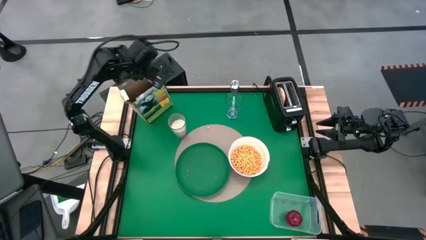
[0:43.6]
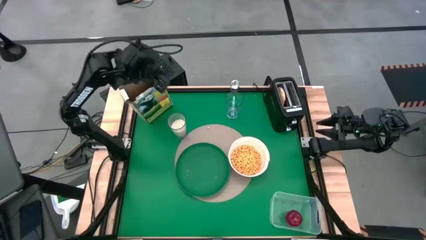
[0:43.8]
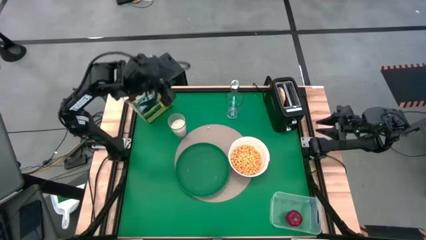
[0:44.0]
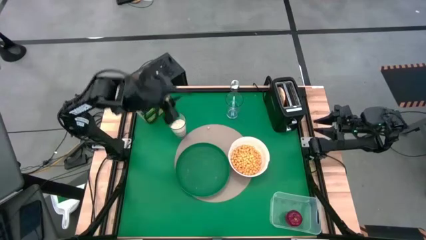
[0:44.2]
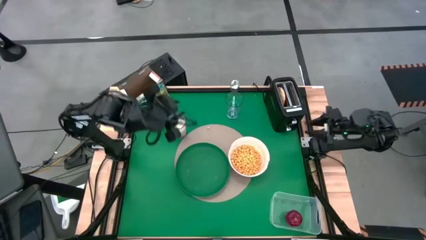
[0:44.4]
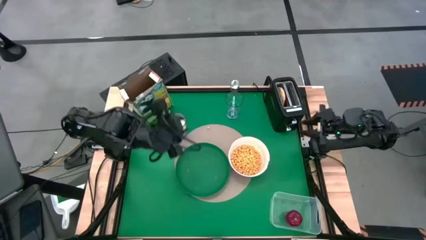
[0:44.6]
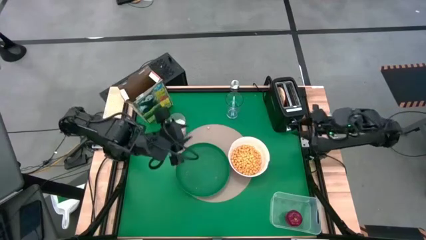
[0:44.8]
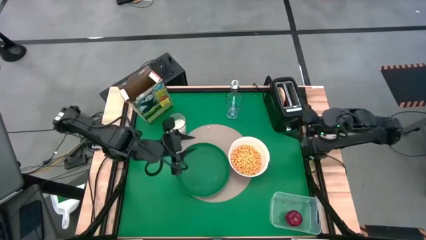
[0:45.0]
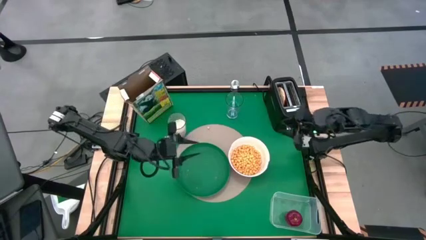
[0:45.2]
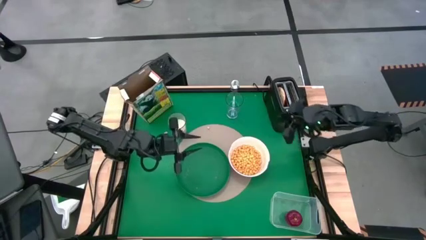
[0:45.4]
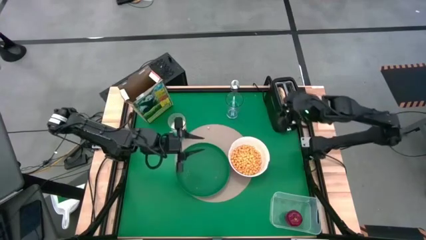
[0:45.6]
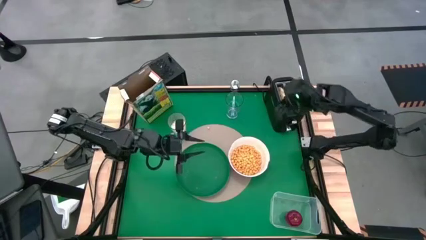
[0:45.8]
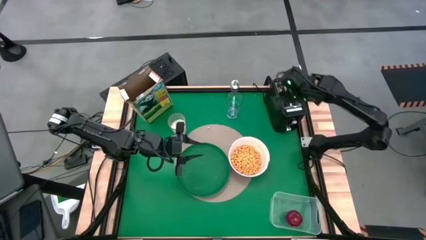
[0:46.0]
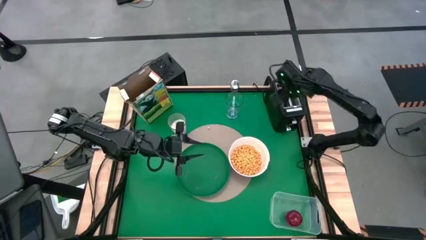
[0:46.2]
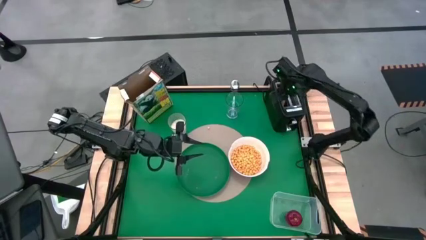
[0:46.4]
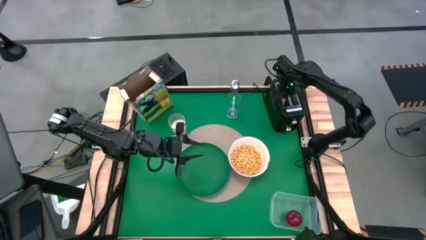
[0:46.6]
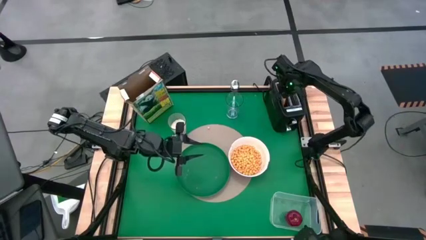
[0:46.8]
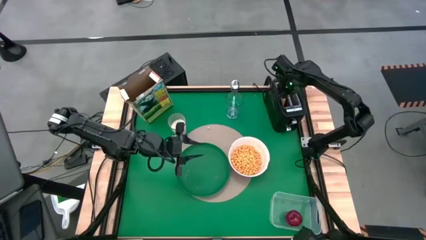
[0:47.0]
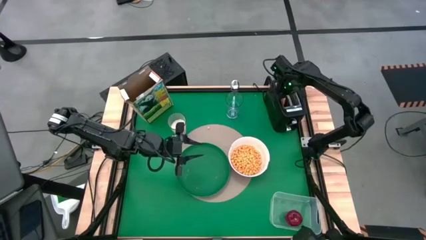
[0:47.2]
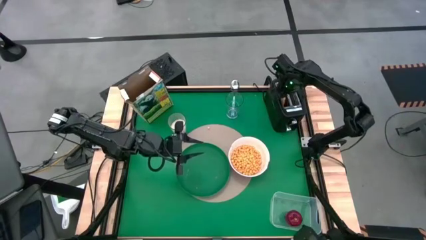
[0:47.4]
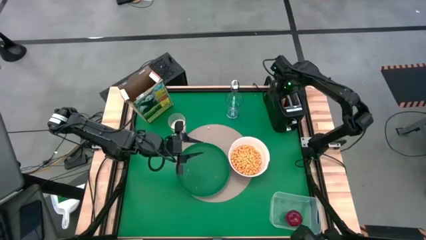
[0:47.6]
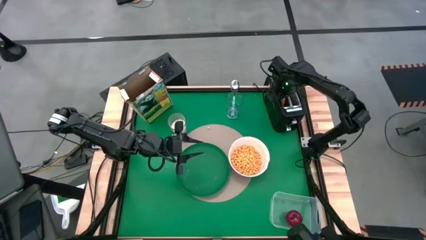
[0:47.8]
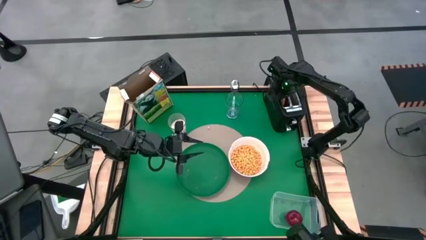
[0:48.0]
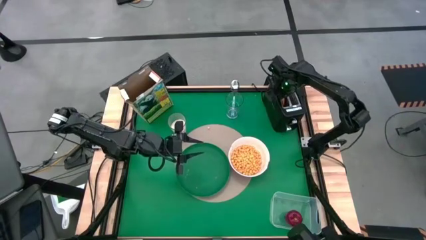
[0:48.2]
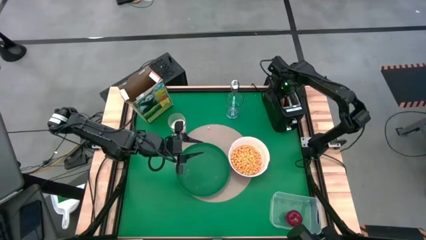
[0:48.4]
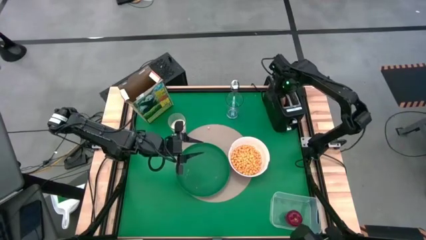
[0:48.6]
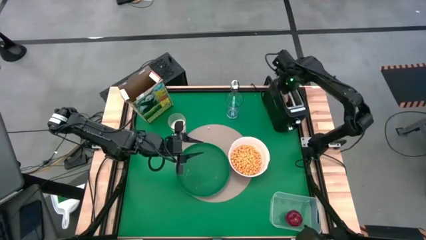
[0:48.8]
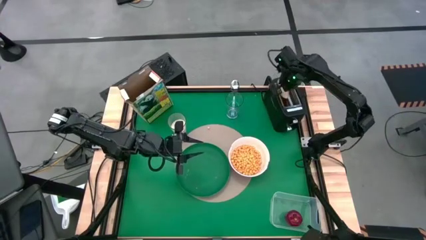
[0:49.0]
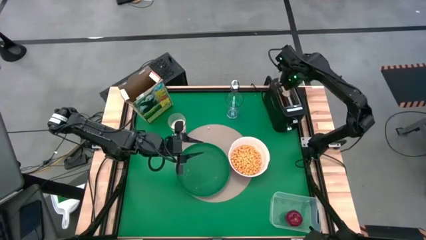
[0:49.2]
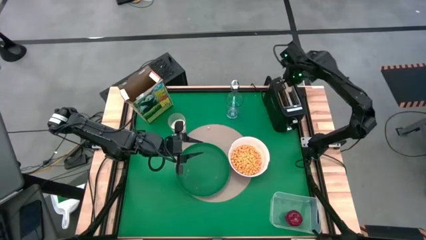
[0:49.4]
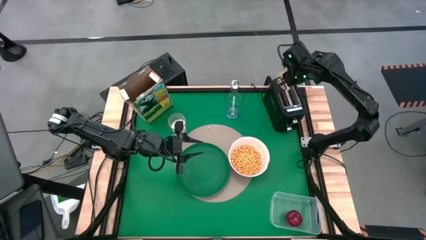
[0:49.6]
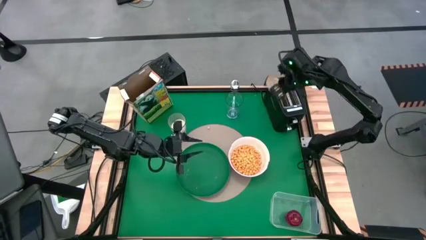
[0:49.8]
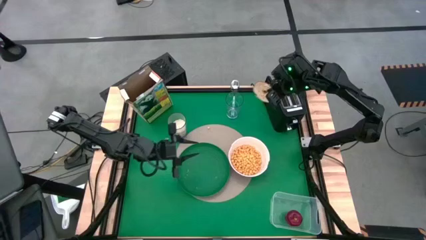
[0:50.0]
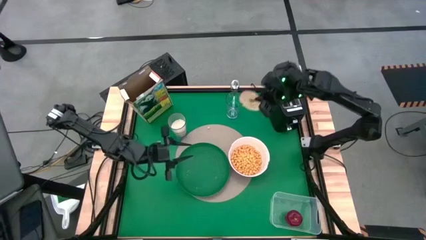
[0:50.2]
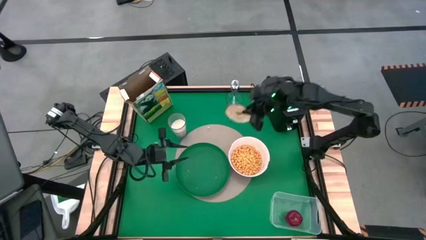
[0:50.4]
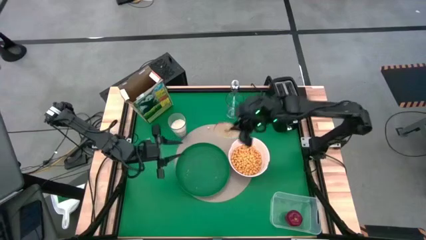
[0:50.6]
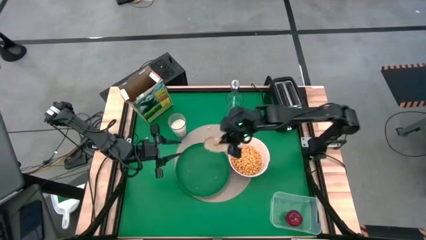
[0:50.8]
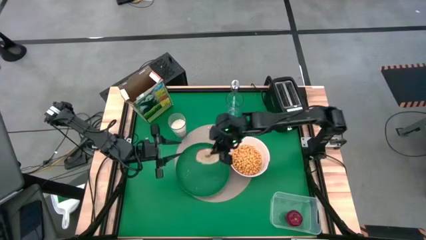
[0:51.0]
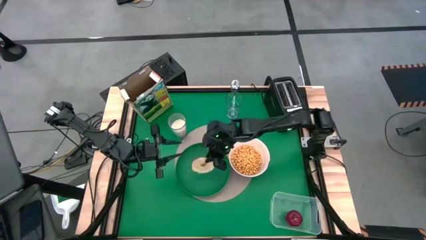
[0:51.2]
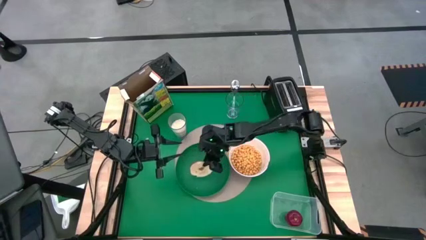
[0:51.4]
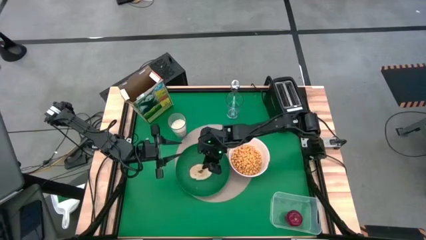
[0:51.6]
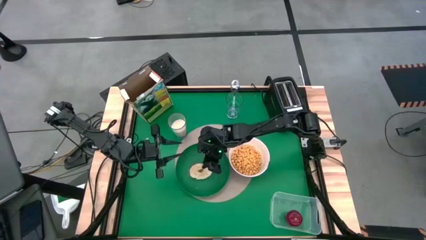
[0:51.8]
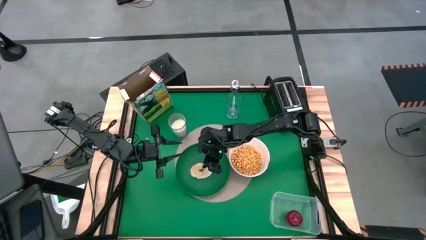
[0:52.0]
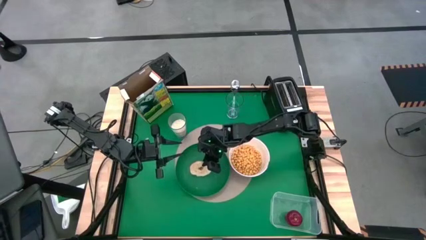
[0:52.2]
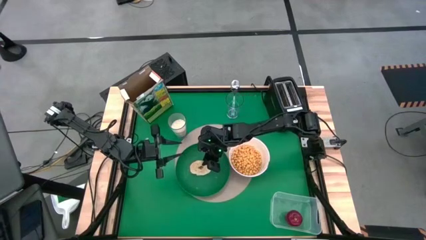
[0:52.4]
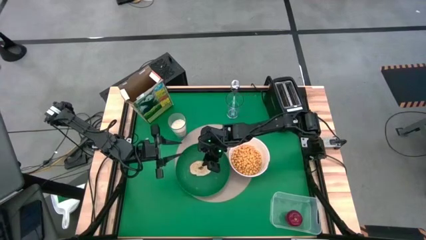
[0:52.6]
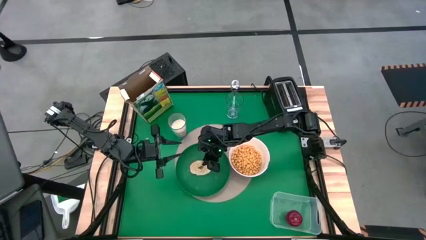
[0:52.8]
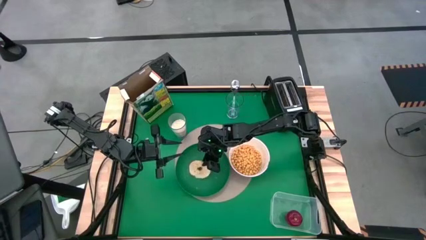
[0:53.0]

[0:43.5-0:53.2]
Task: Arrange a breakfast setting
Put the toasted bagel the green plate

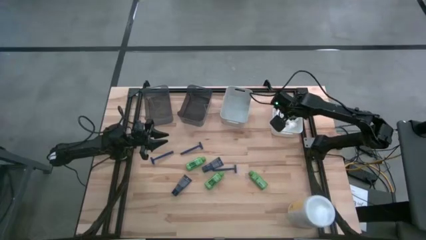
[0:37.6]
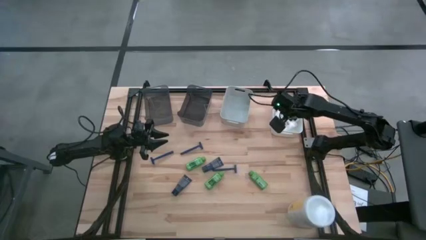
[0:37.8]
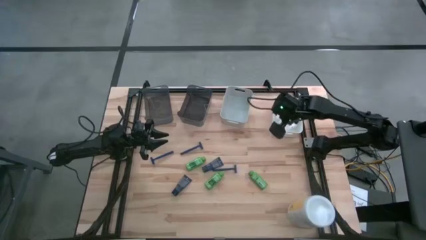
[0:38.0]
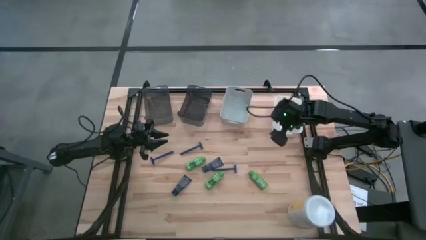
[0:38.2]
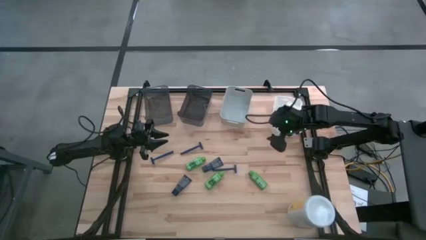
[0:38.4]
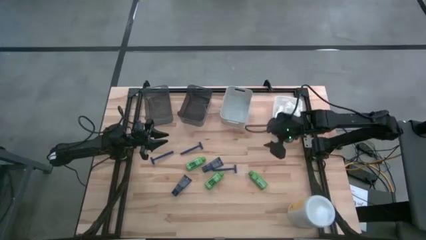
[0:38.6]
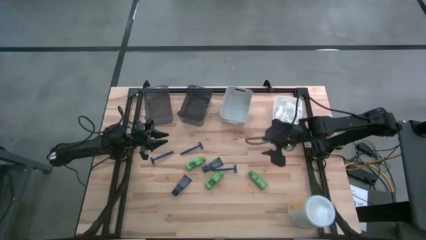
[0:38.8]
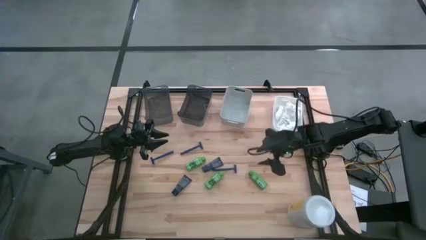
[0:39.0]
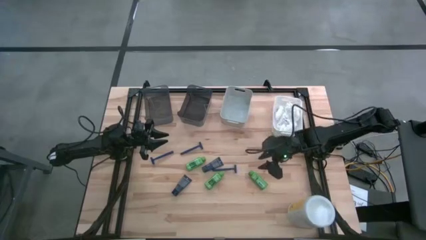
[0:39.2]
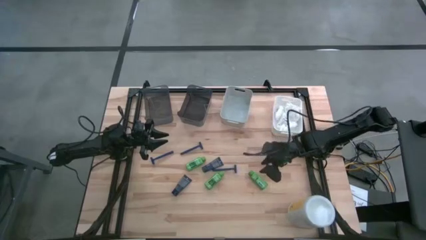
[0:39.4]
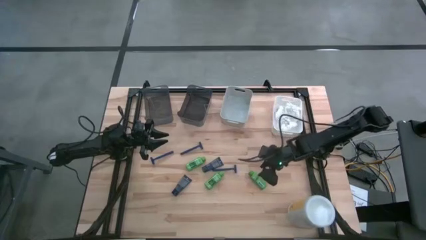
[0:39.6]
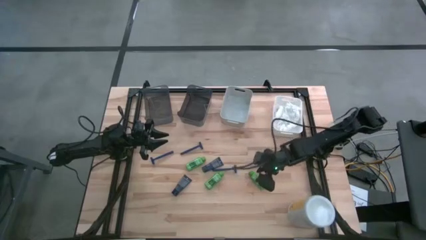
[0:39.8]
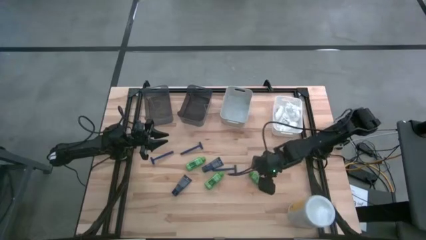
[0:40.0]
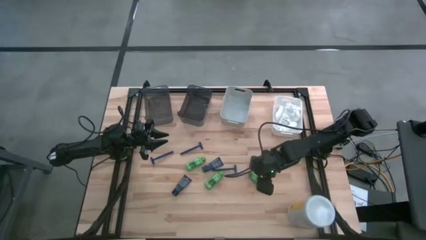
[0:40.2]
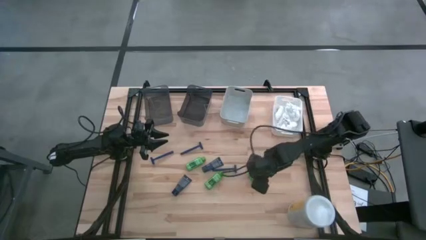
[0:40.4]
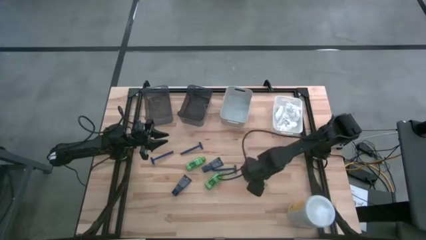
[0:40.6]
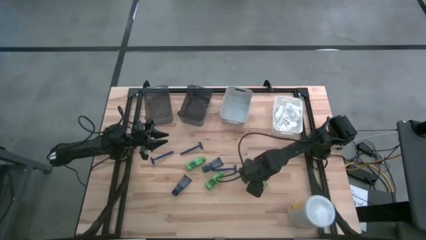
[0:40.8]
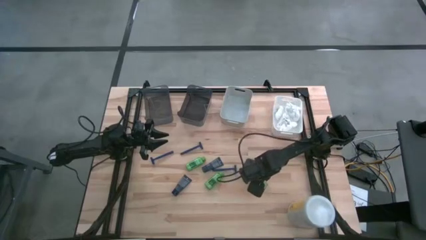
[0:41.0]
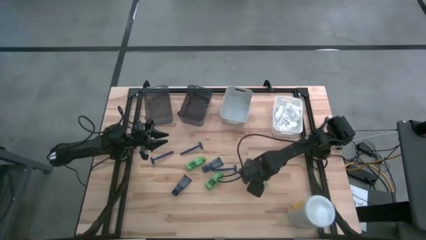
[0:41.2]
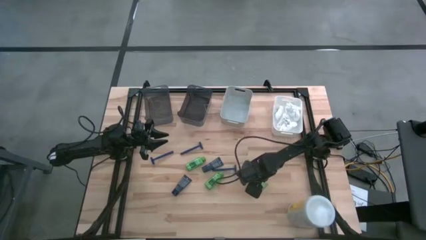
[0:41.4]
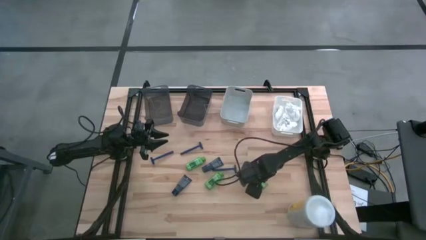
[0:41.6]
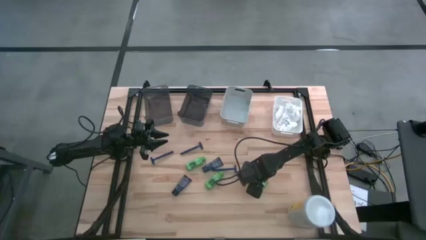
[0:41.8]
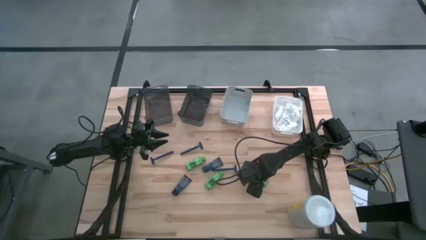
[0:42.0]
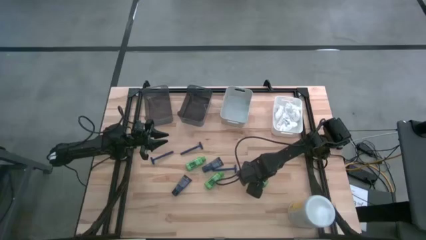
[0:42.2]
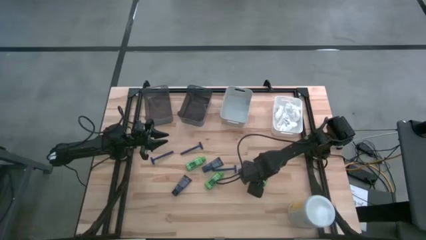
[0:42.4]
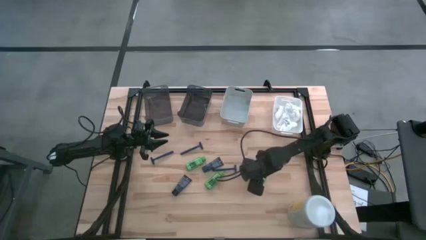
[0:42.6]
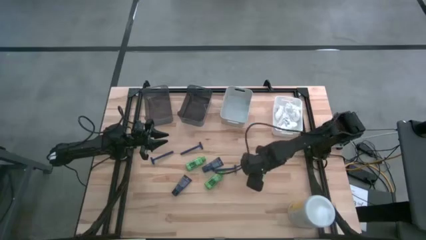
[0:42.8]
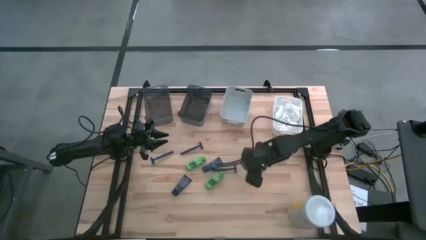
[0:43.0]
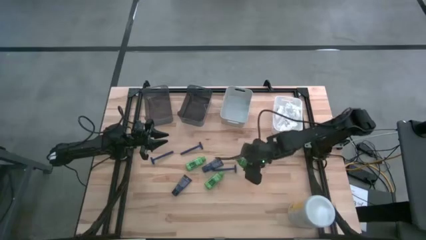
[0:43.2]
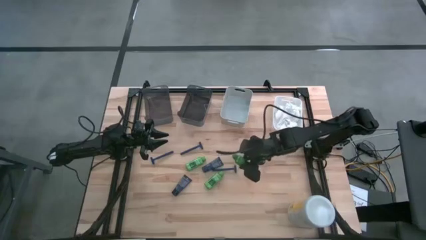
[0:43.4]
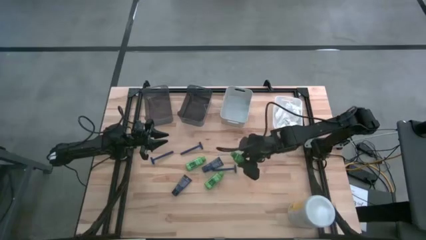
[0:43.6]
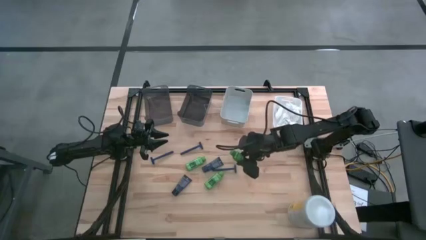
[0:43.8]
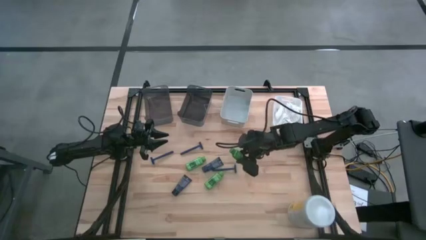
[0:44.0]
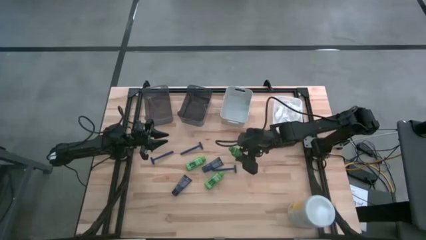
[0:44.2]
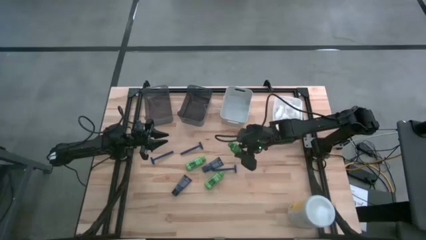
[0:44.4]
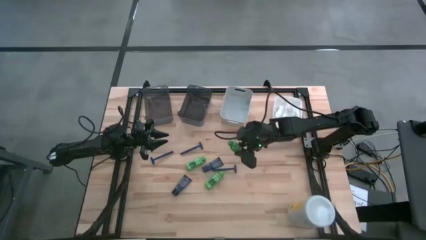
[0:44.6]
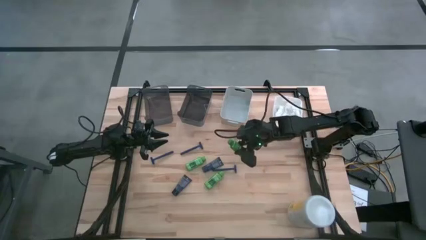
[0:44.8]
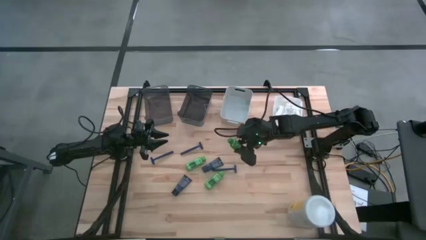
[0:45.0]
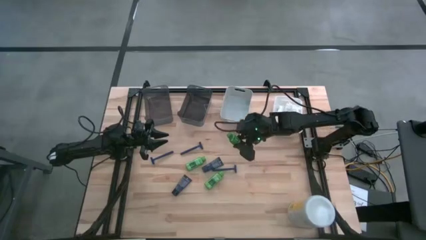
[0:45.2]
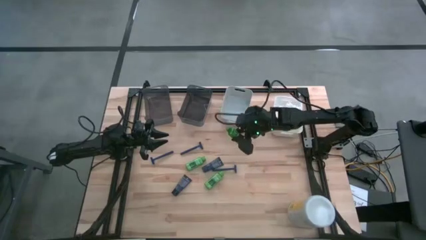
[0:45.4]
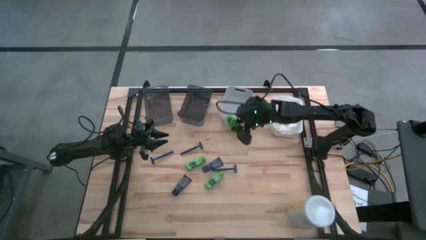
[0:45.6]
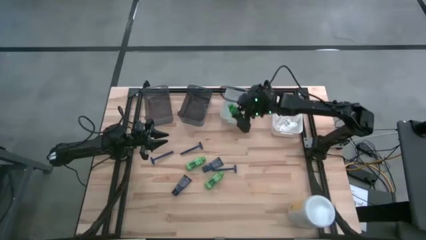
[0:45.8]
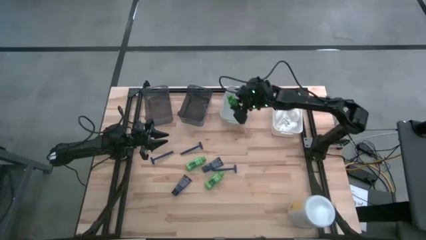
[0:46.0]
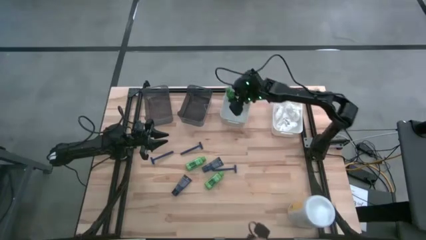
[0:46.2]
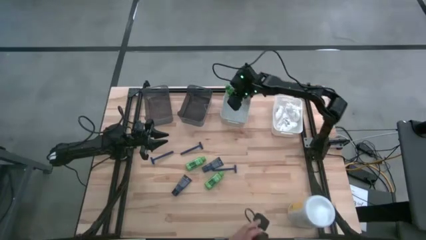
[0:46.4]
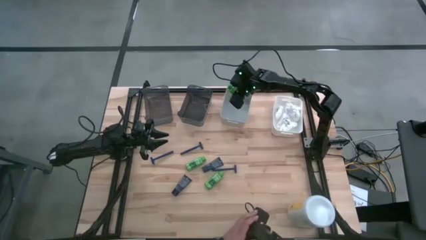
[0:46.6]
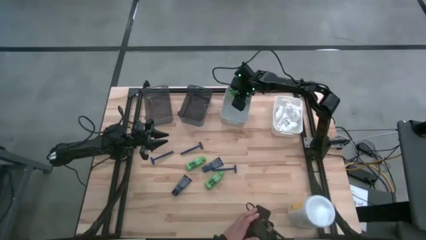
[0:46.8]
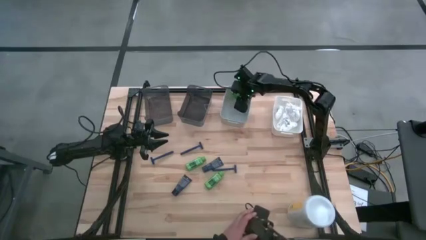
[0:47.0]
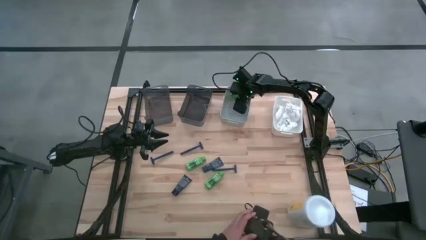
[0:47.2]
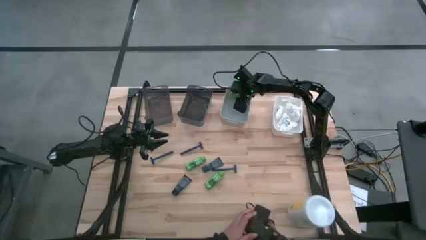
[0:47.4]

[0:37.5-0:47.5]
Task: Pick & Place Travel size toiletries
Put the green shampoo into the gray bin
